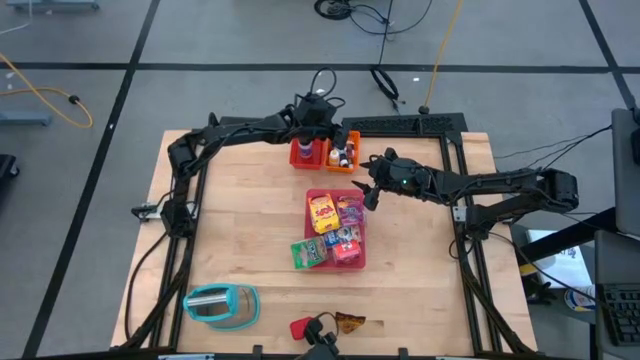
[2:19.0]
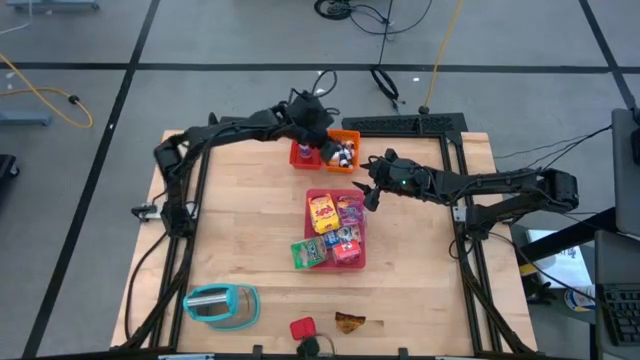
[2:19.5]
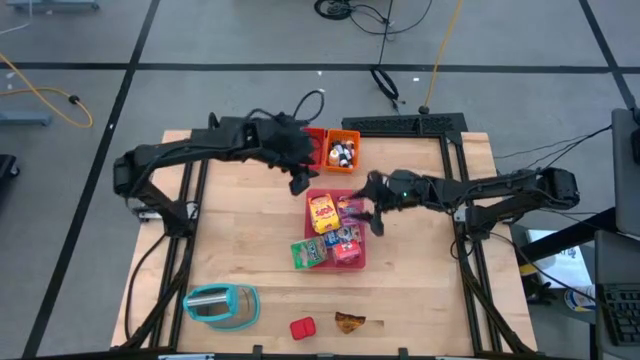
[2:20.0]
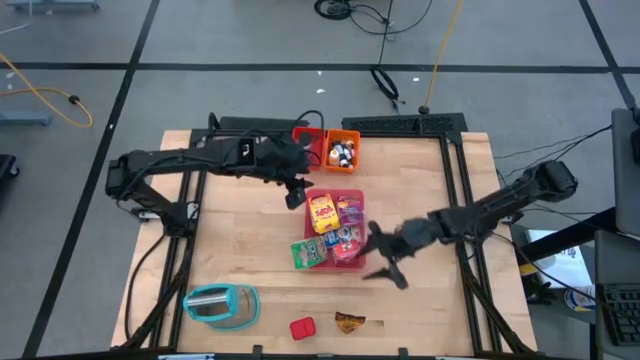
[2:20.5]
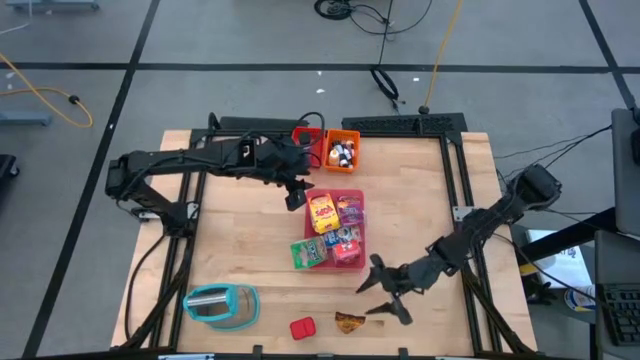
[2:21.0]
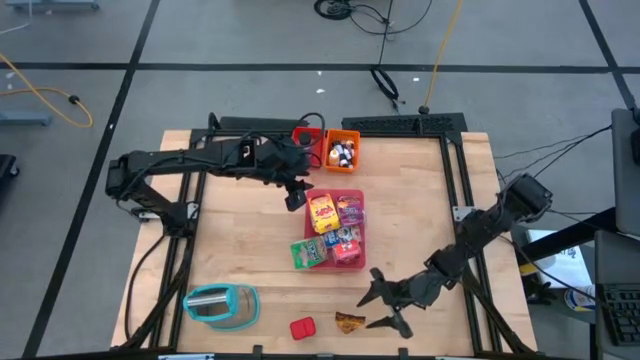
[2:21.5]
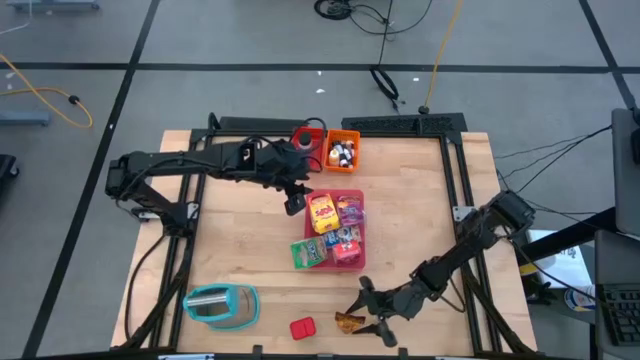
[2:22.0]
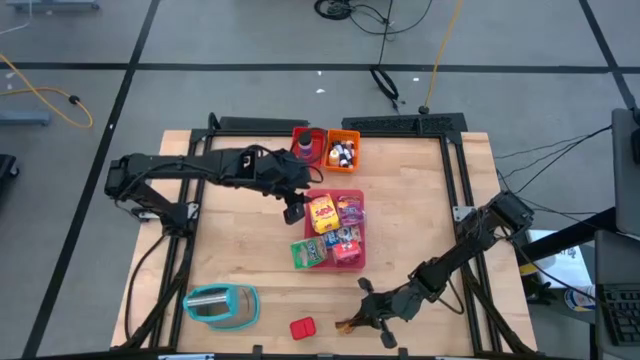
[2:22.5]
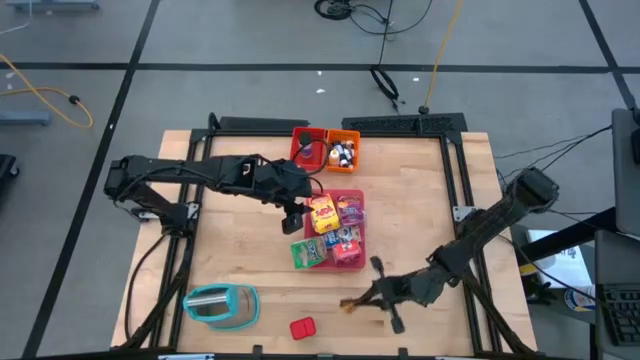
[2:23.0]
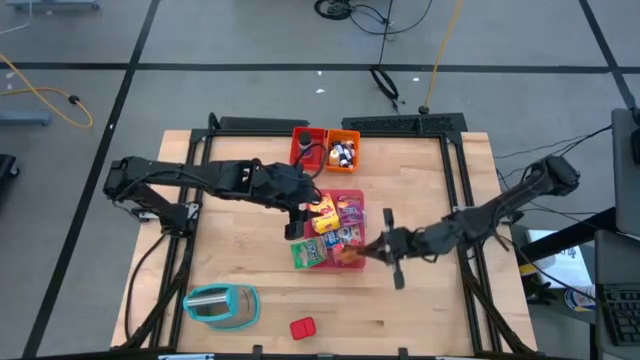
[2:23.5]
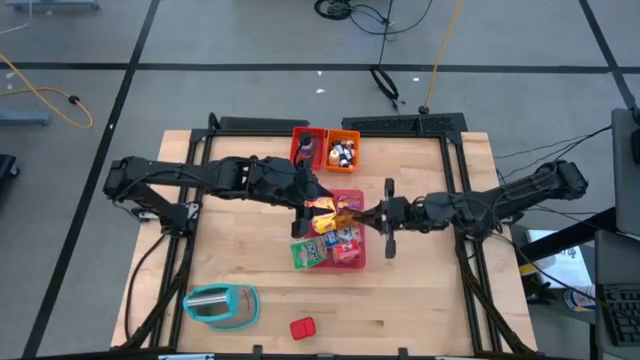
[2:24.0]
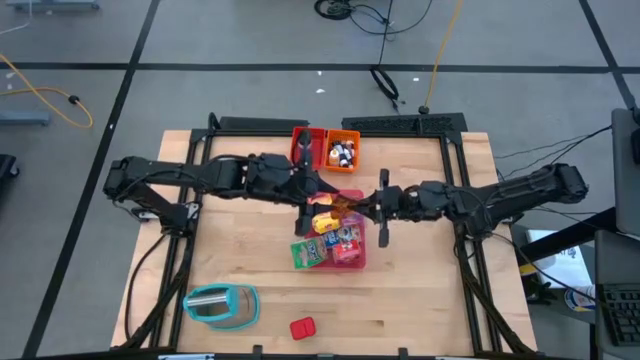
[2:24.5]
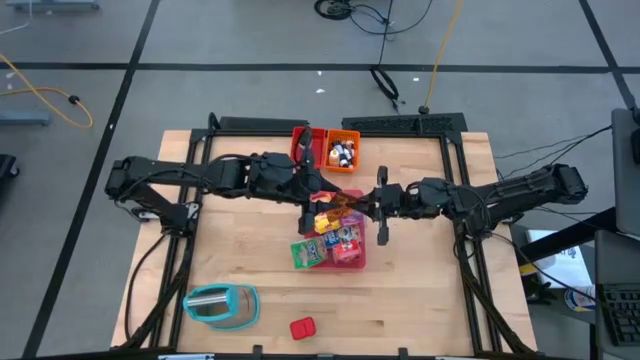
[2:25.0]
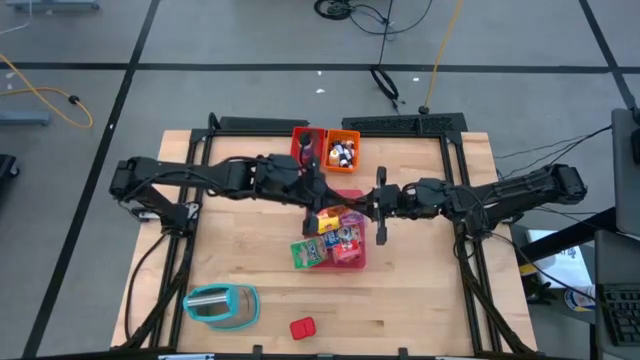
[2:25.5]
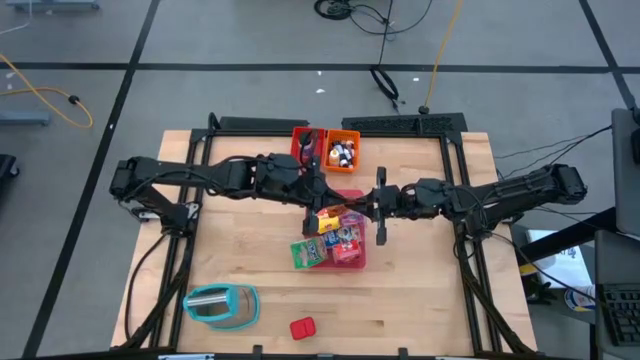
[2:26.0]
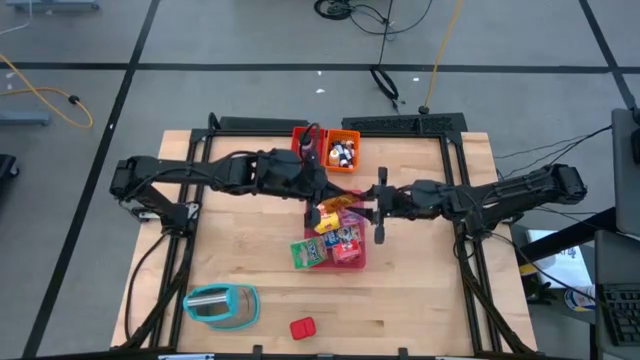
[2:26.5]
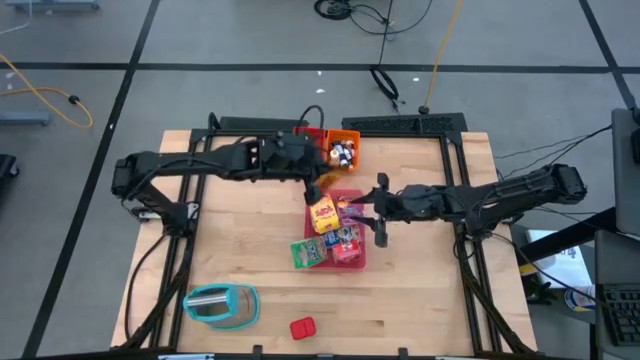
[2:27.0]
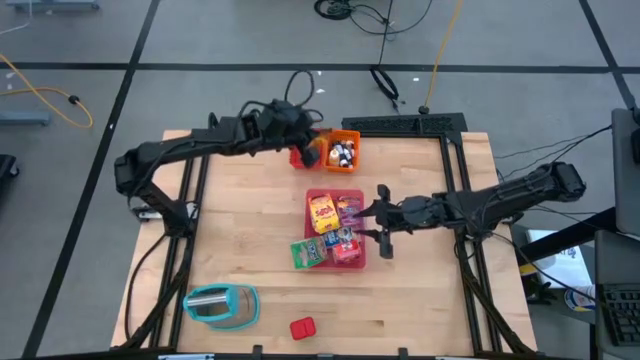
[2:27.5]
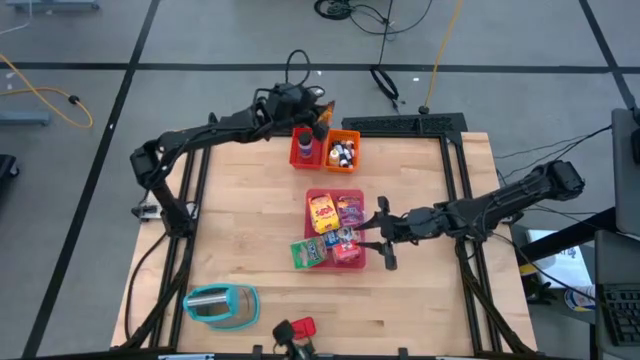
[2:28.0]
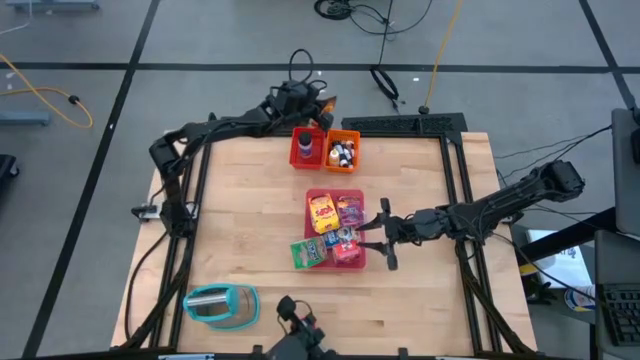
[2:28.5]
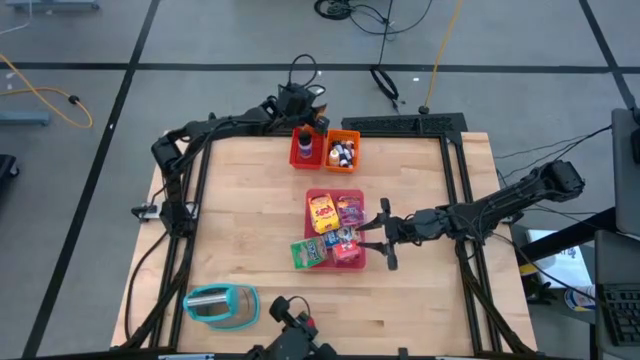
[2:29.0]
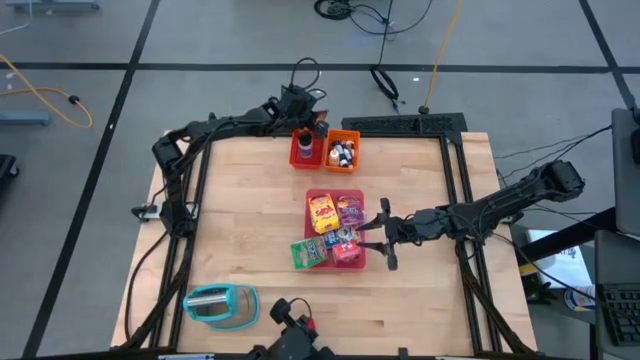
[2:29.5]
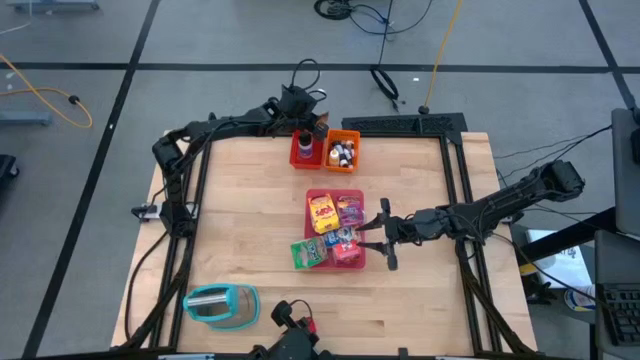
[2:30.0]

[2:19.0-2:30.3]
Task: Pick & Place Kitchen Items
Put the orange seasoning pack into the red basket

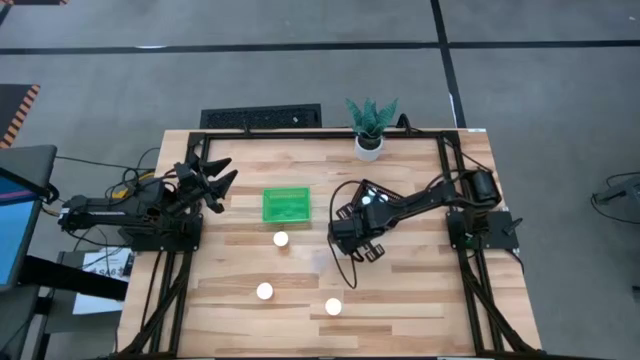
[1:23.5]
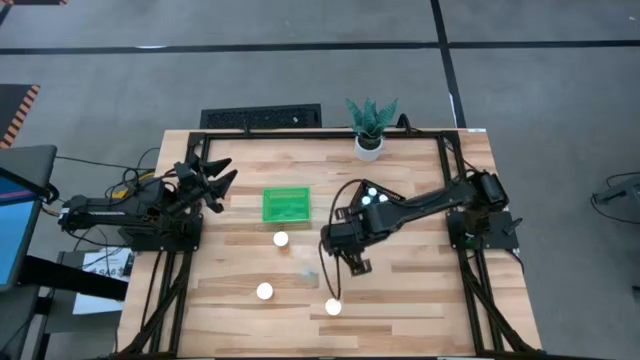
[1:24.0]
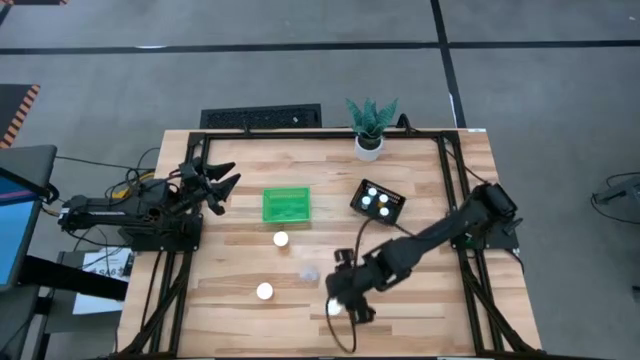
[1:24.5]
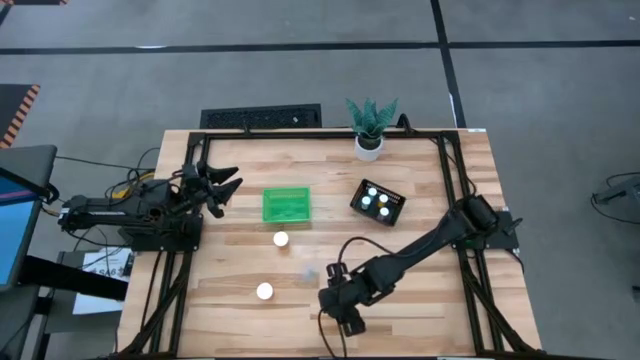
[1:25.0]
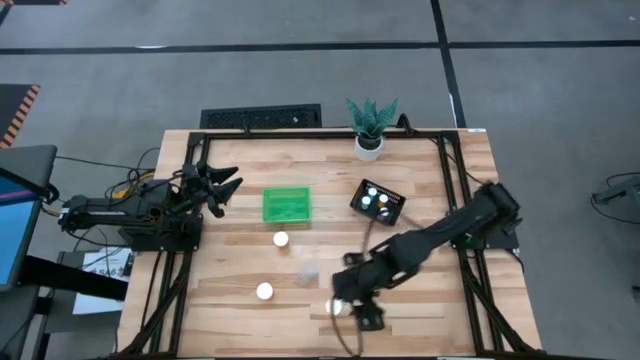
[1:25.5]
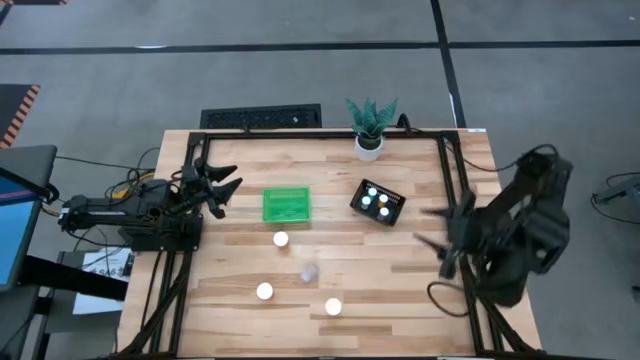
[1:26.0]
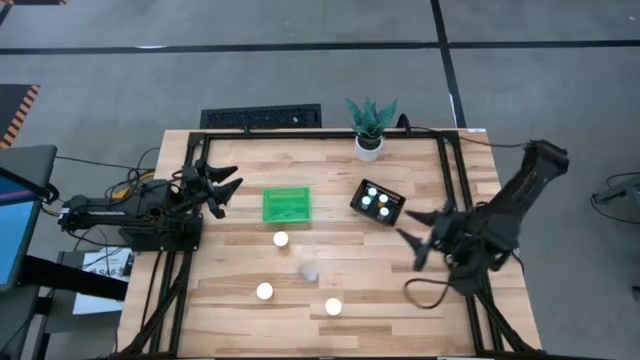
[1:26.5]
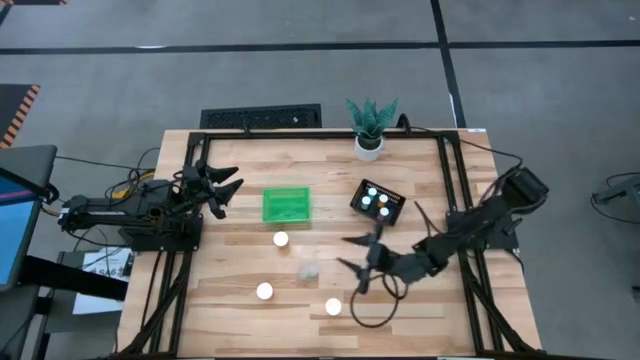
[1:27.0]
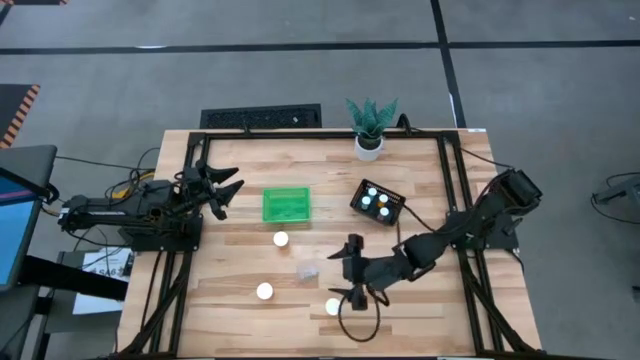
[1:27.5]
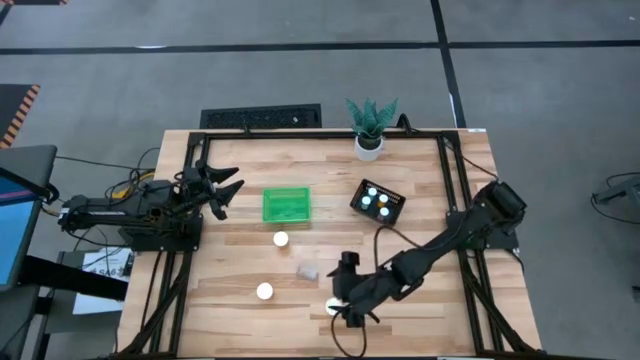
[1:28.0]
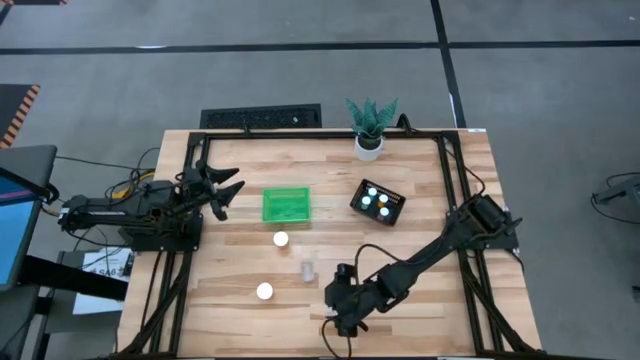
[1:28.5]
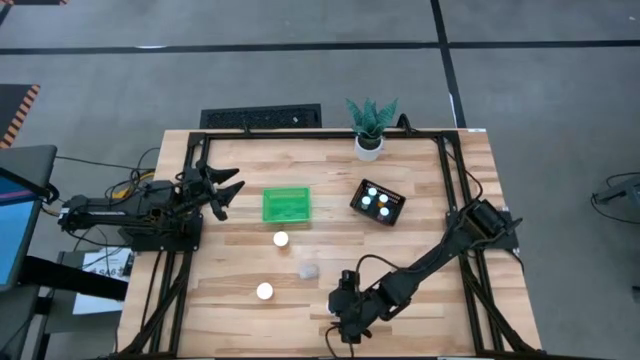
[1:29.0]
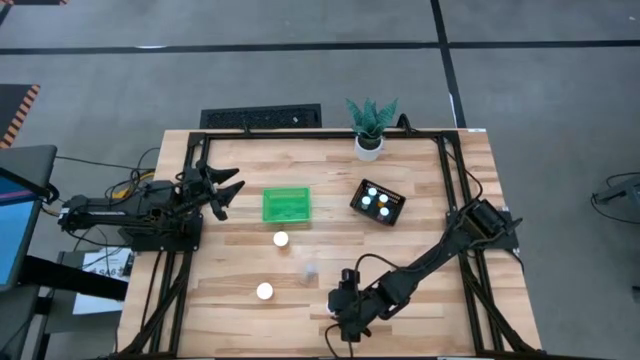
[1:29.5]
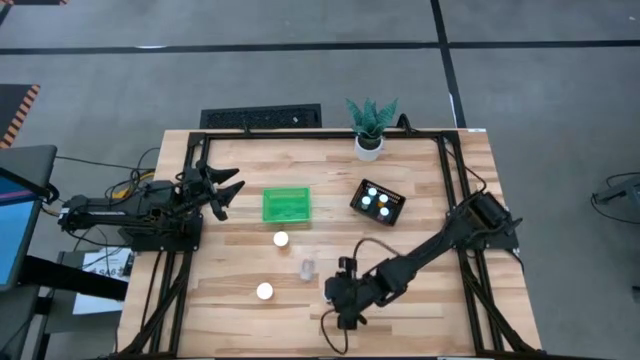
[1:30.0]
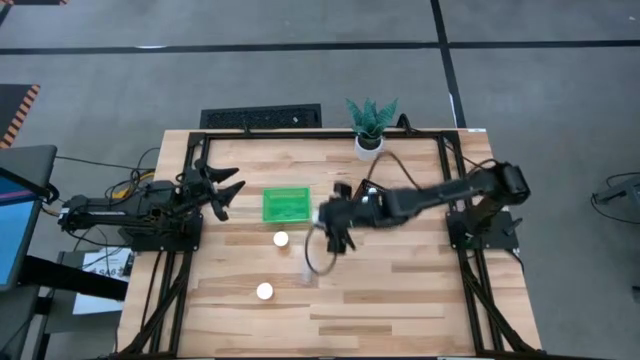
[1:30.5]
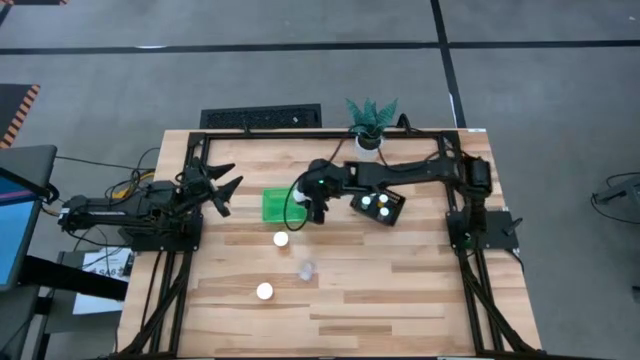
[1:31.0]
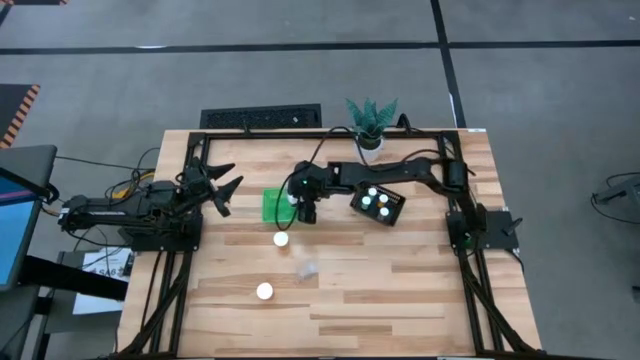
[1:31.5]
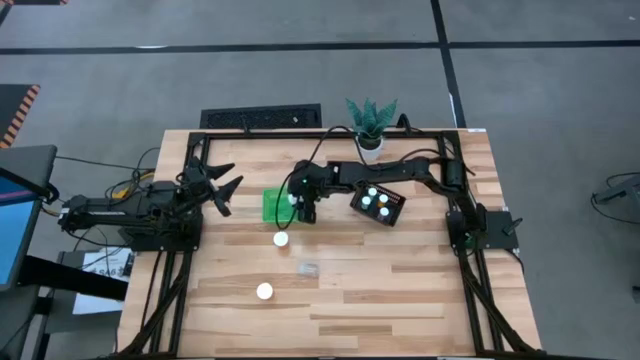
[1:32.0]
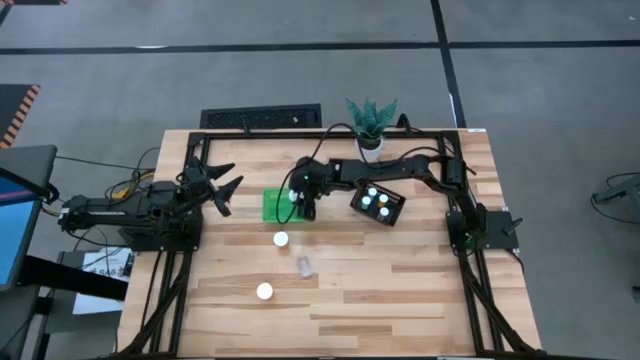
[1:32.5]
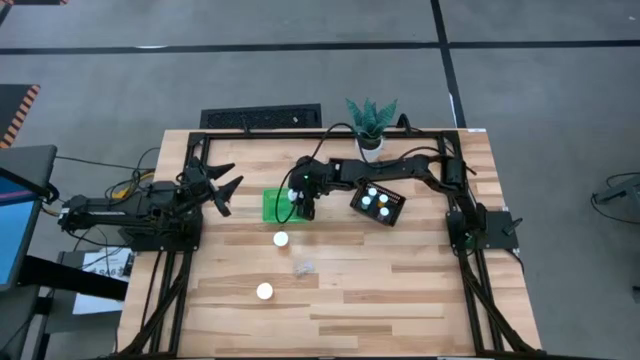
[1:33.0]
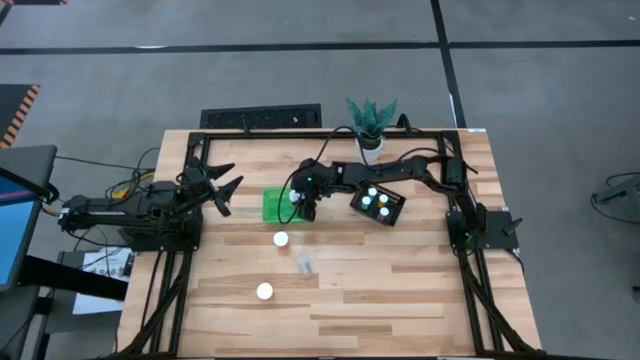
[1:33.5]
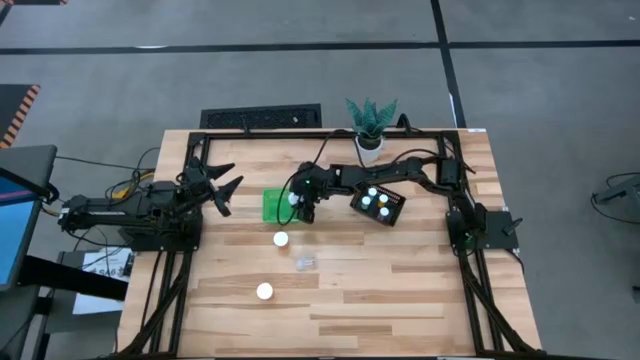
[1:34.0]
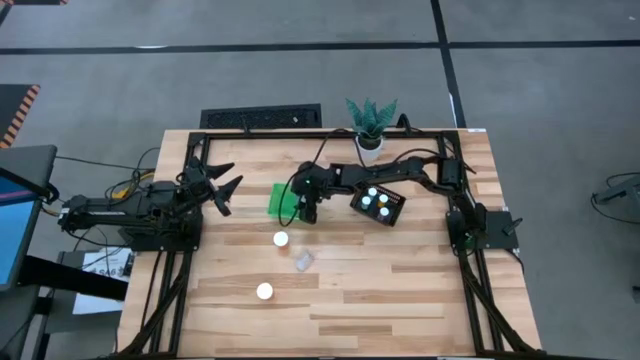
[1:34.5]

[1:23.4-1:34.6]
Task: Pick and place medicine bottles into bin by pill shape (circle, oval)
Put the bottom right orange capsule bottle into the green basket

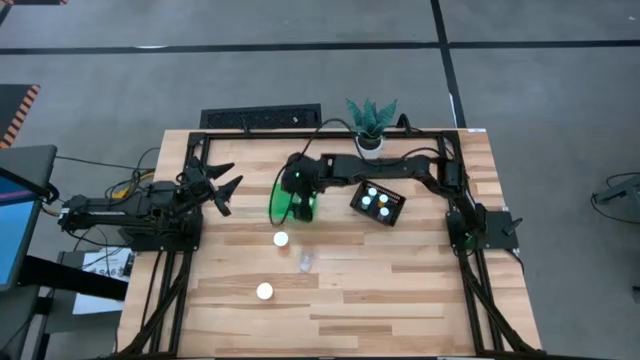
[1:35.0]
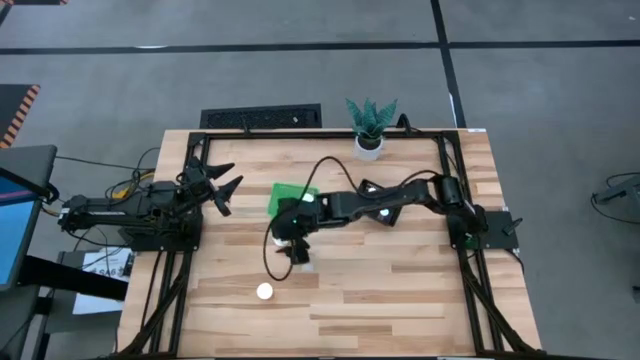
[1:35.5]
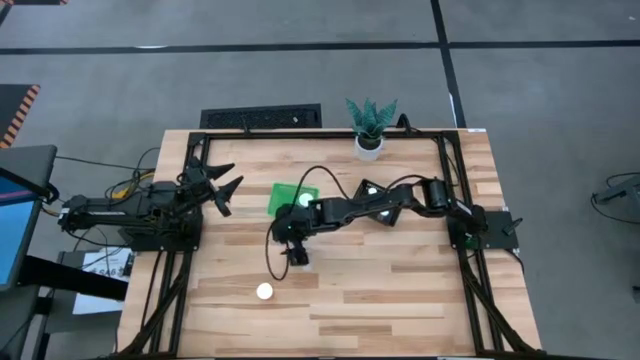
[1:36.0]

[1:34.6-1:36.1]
Put the top orange capsule bottle into the green basket
